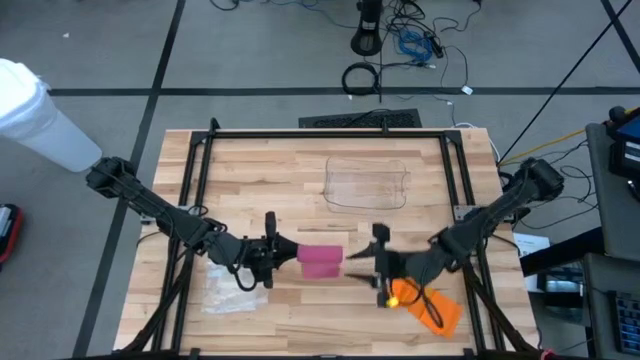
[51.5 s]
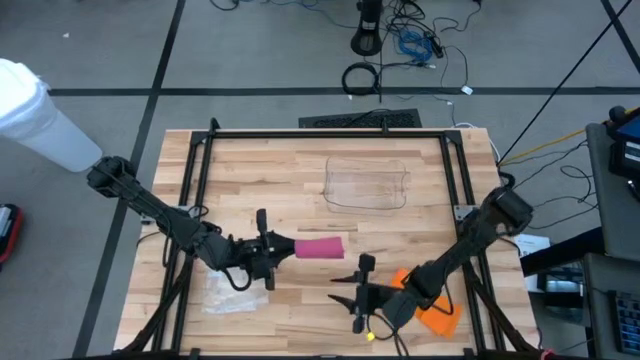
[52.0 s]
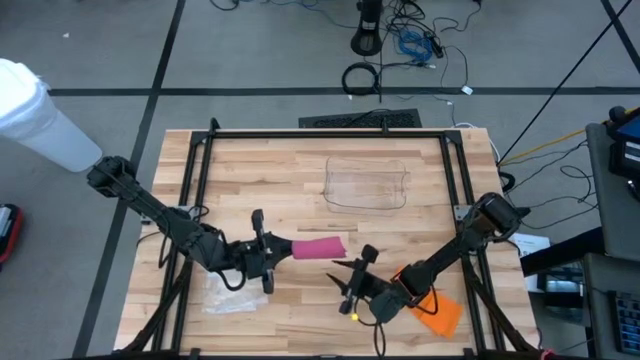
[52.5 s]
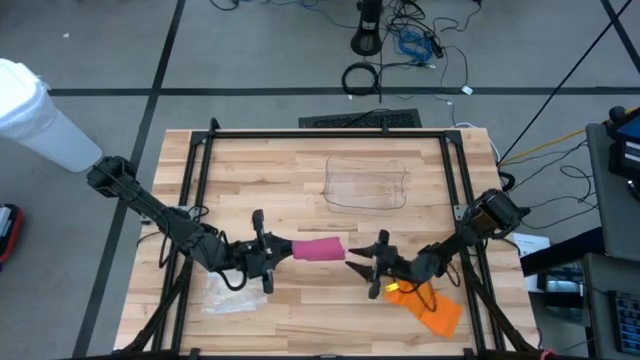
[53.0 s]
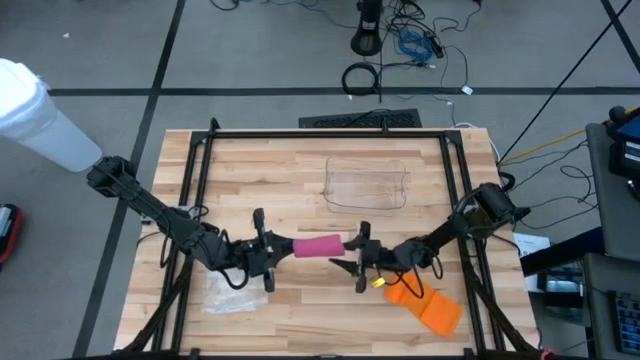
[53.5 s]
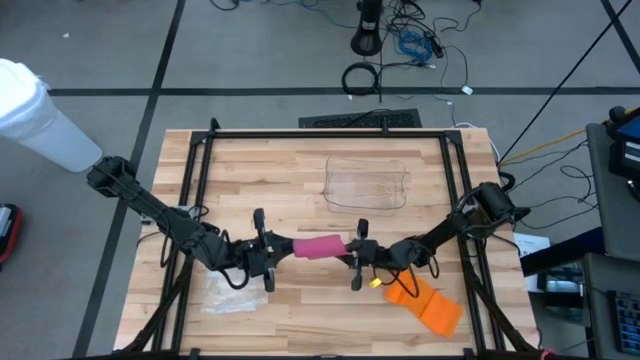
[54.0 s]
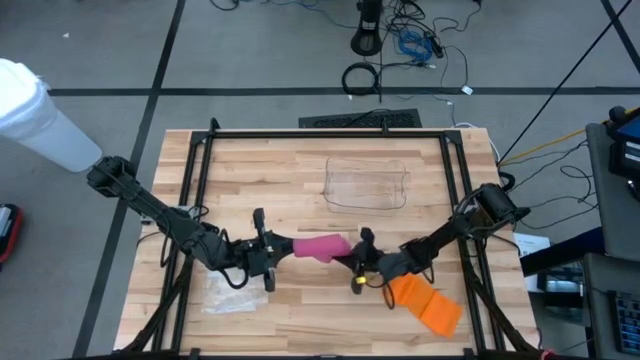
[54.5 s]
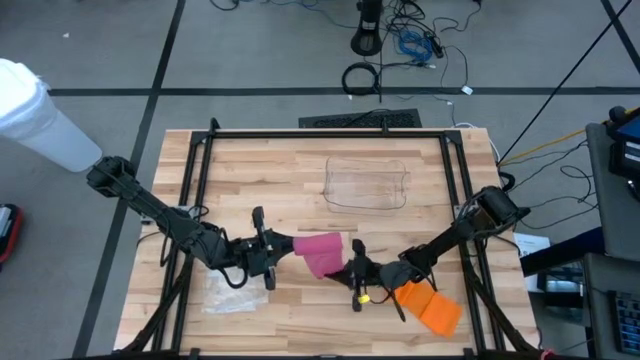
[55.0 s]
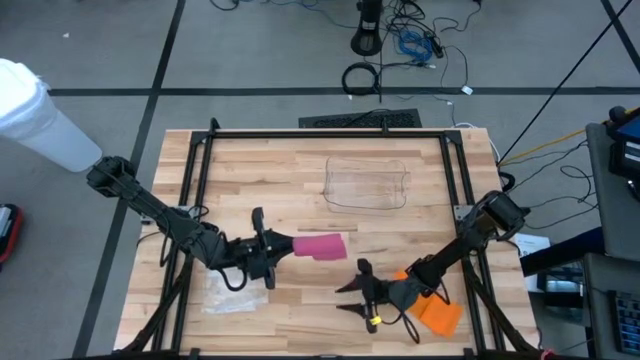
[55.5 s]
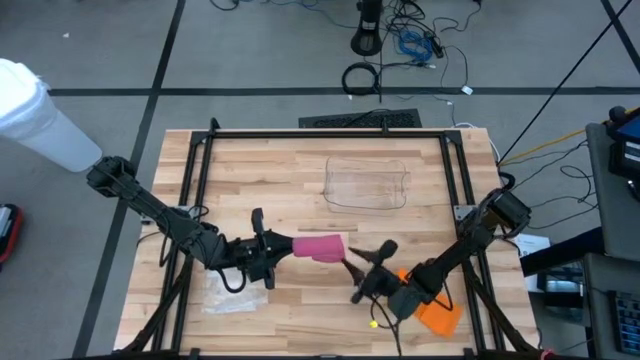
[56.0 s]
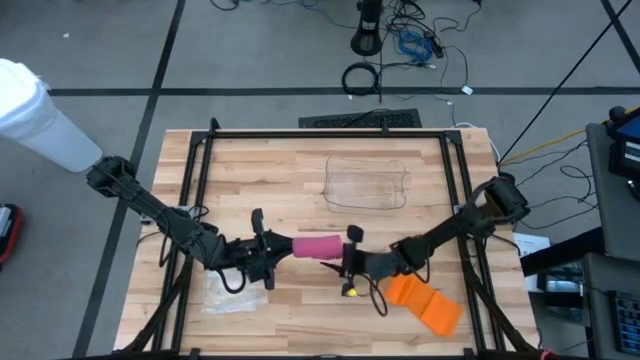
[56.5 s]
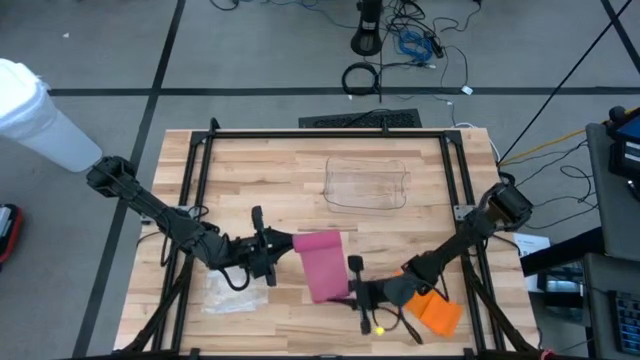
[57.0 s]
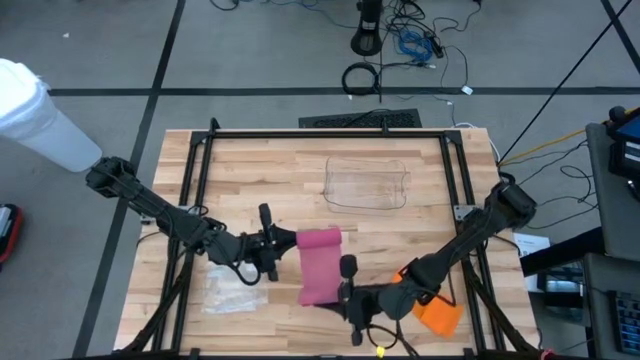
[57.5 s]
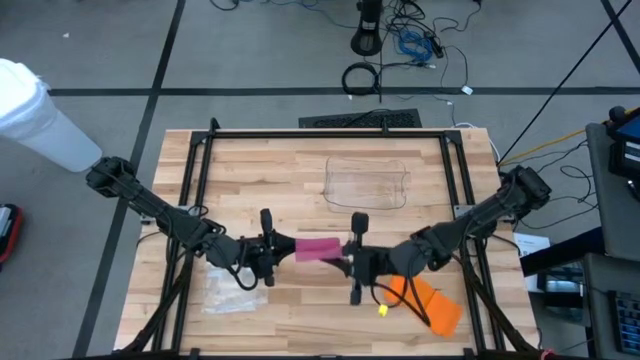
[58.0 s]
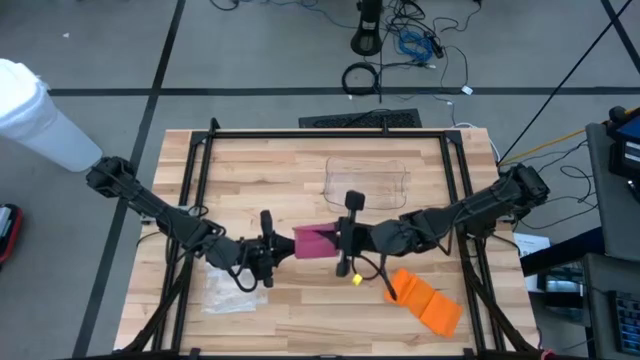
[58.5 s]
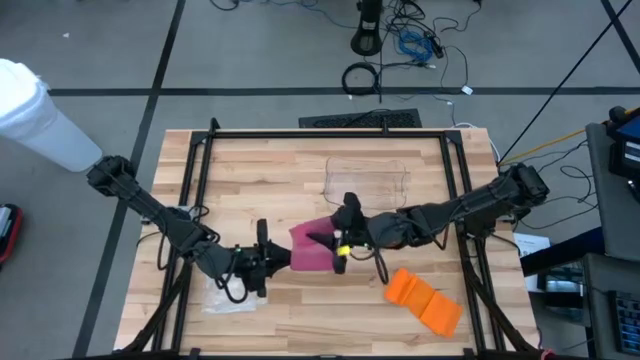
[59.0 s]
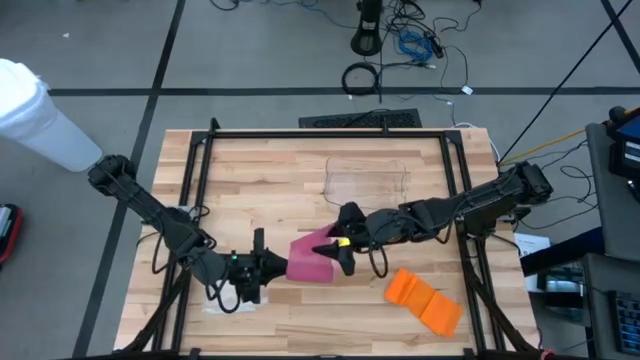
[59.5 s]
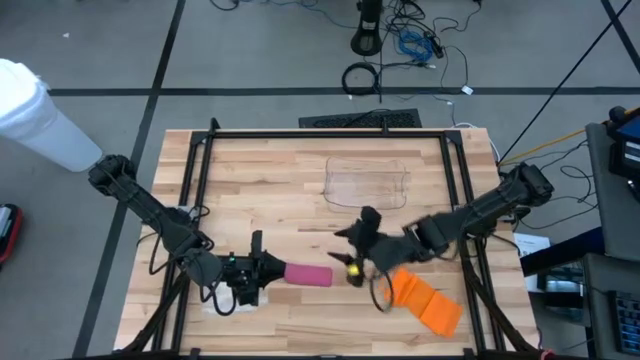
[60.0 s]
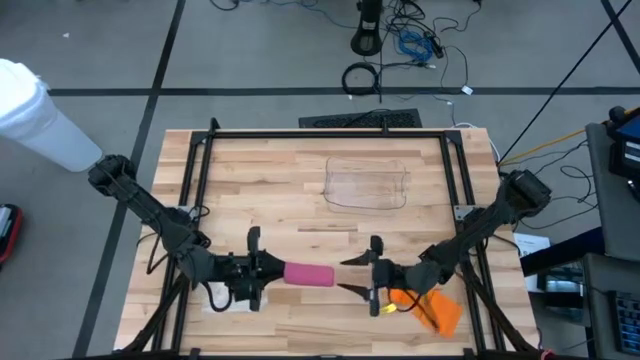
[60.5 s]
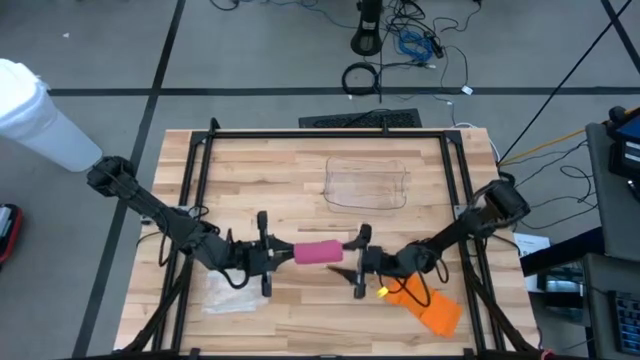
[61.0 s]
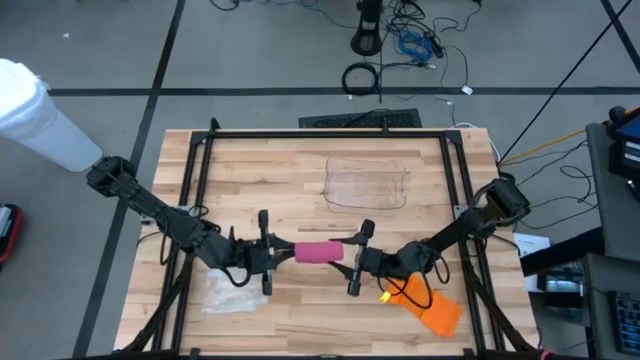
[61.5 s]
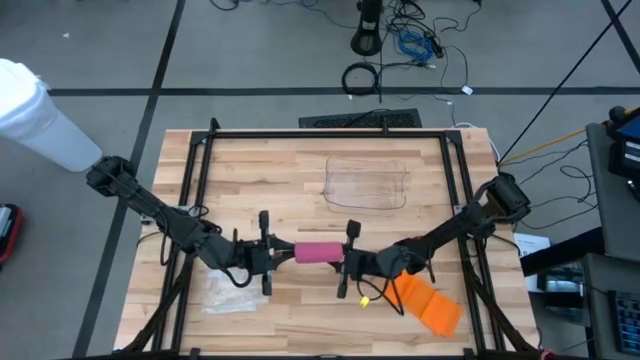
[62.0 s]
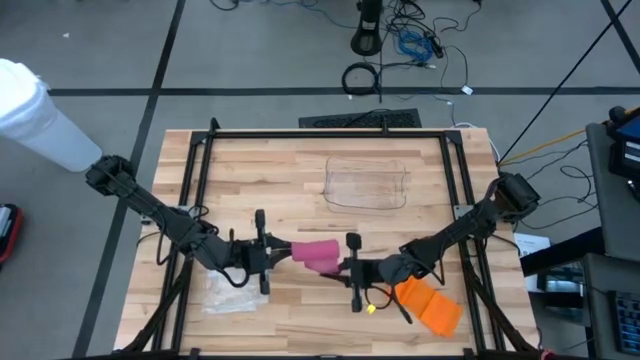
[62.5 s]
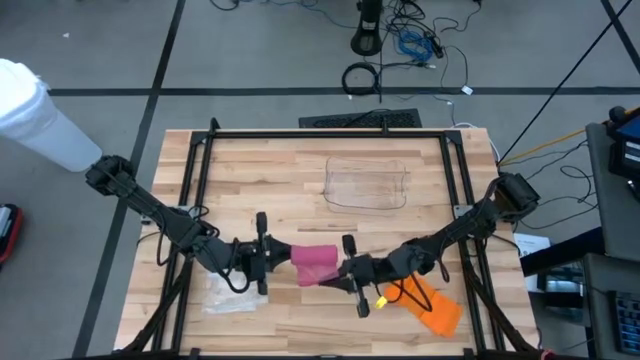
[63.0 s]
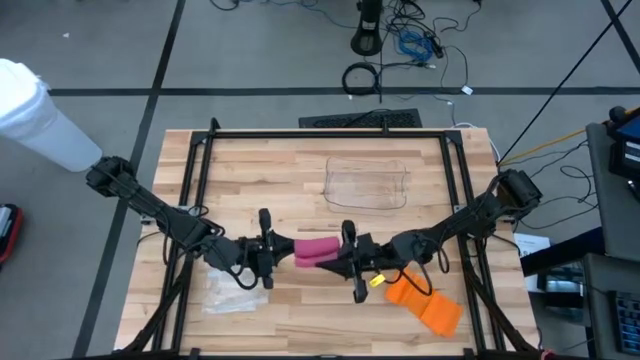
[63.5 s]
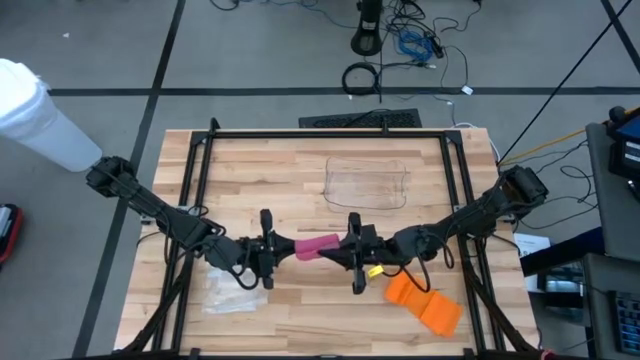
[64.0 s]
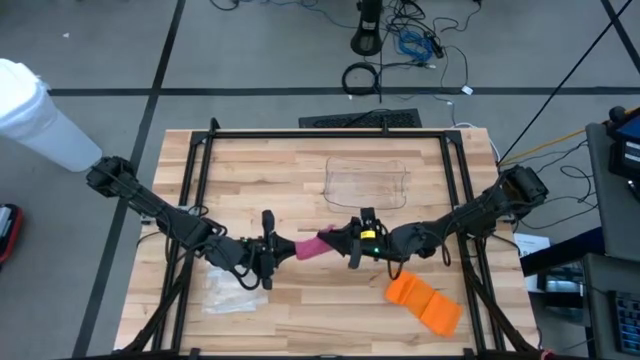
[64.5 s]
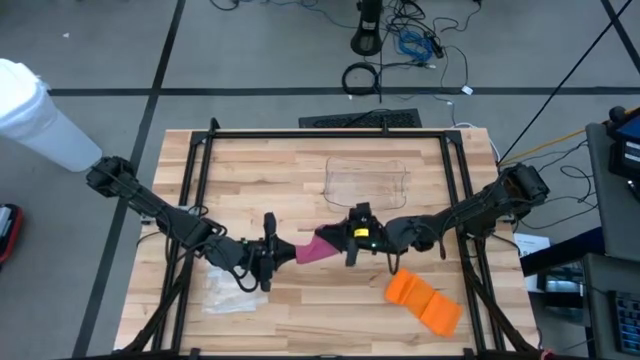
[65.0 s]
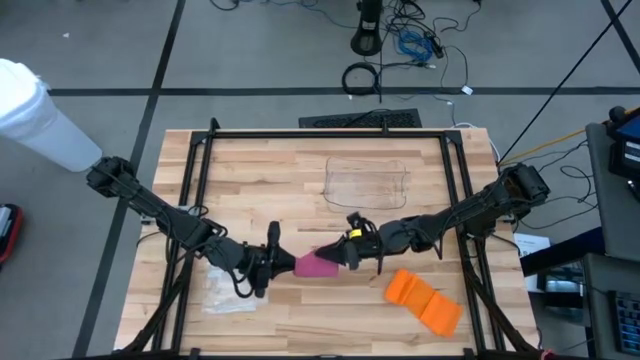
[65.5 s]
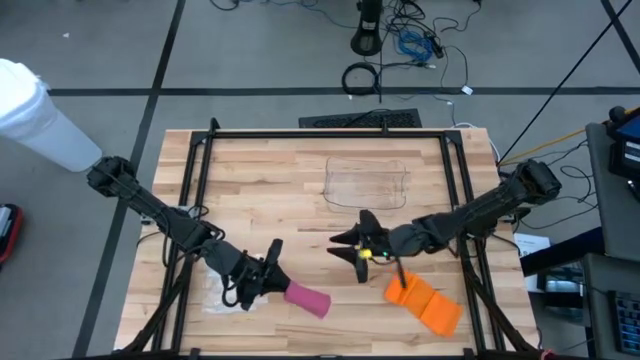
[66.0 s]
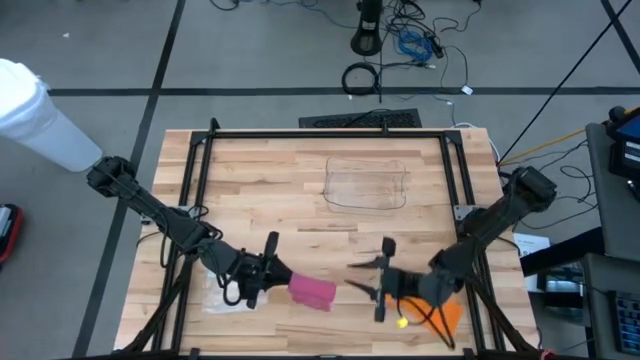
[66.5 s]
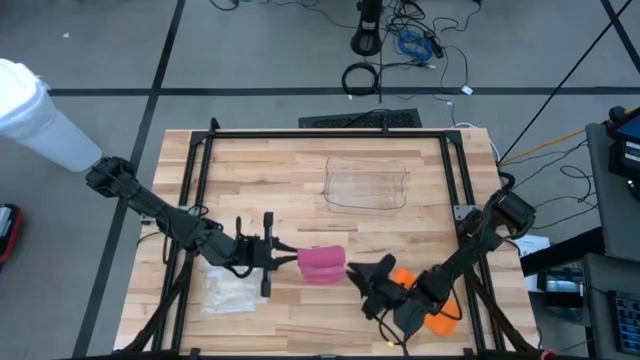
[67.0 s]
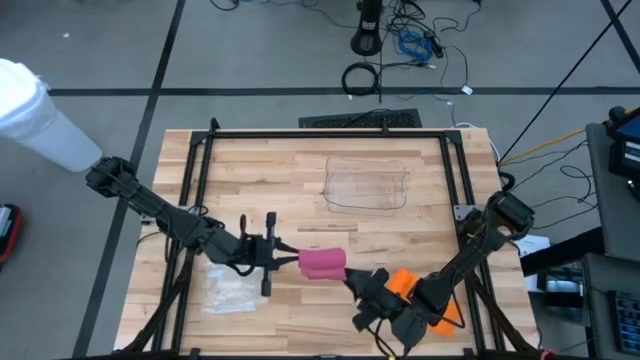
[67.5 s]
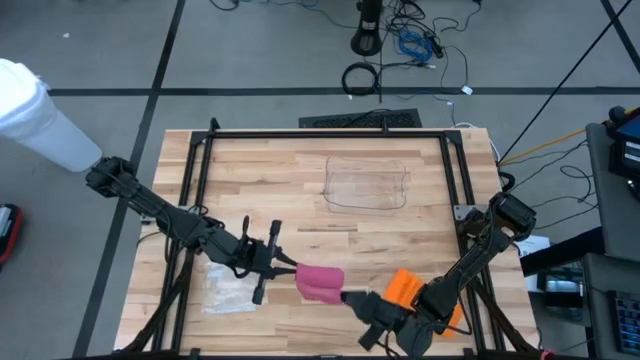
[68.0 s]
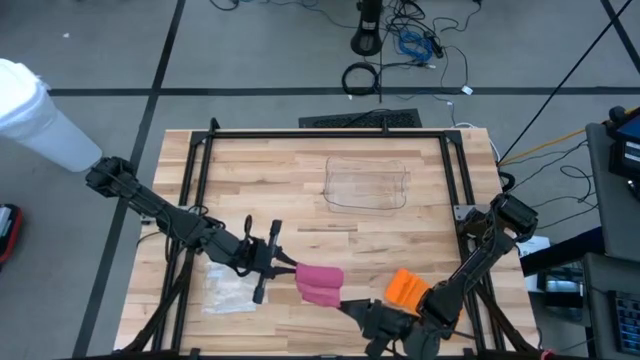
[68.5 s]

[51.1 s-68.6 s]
Task: Roll bandage
Roll the pink bandage

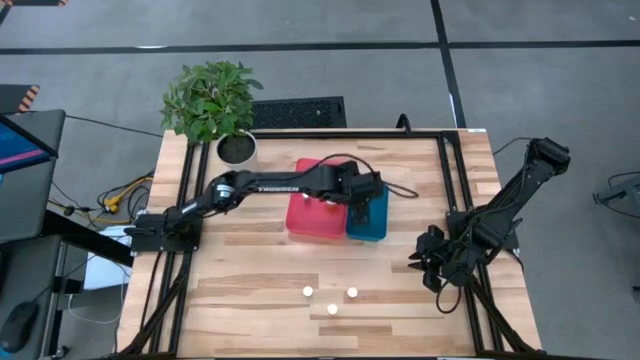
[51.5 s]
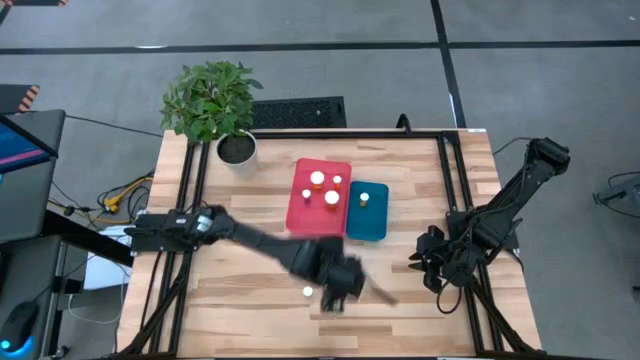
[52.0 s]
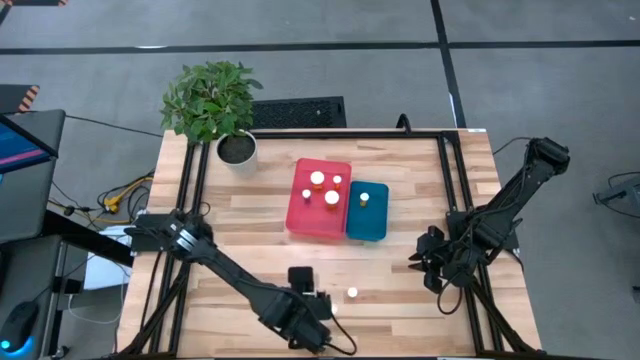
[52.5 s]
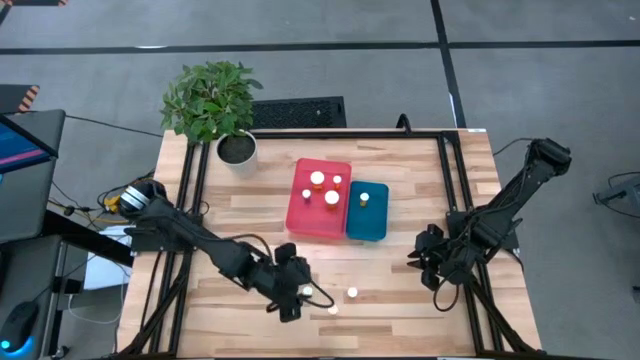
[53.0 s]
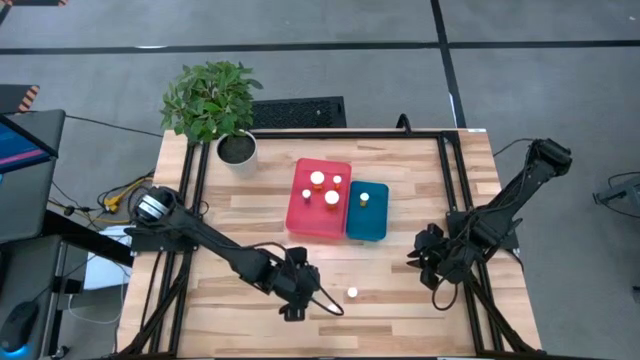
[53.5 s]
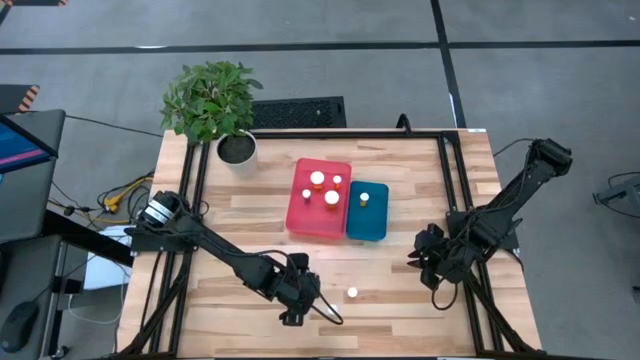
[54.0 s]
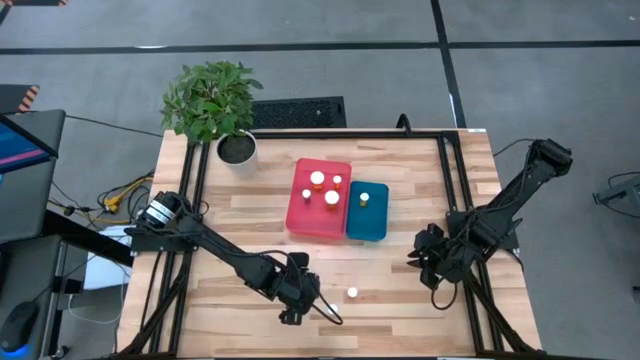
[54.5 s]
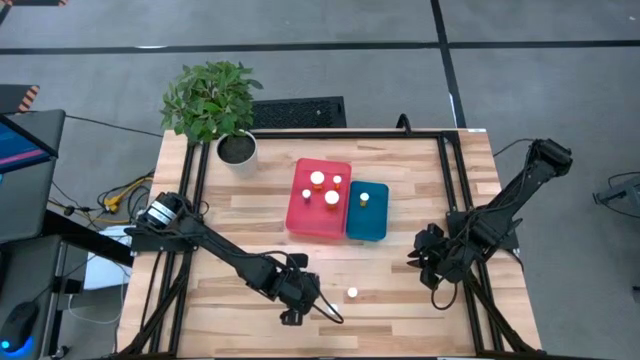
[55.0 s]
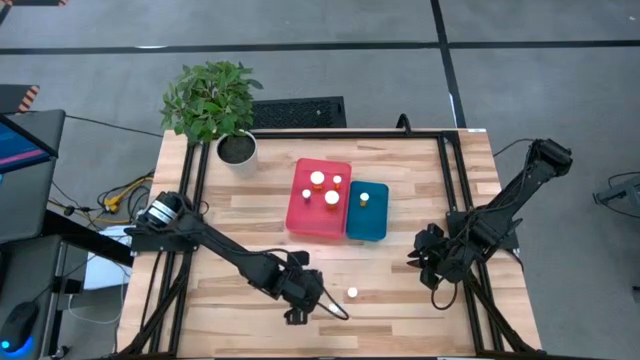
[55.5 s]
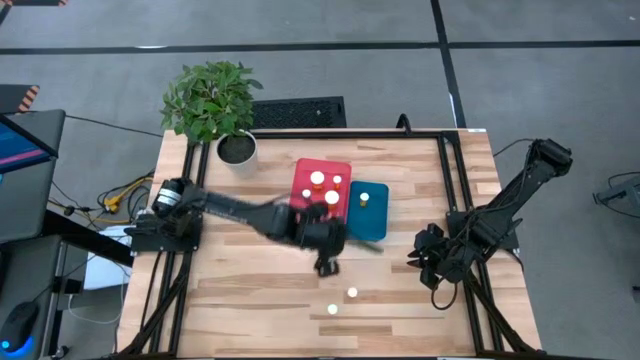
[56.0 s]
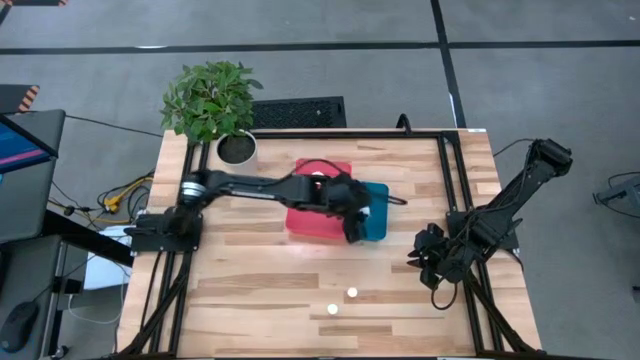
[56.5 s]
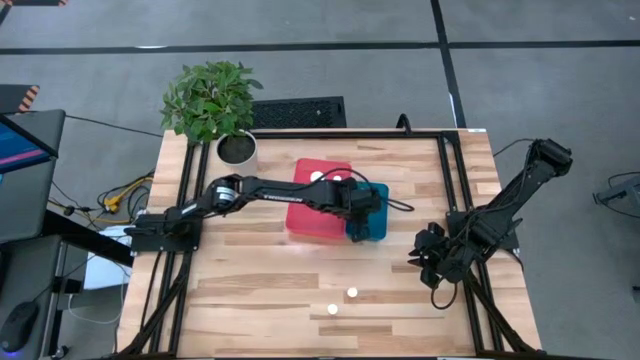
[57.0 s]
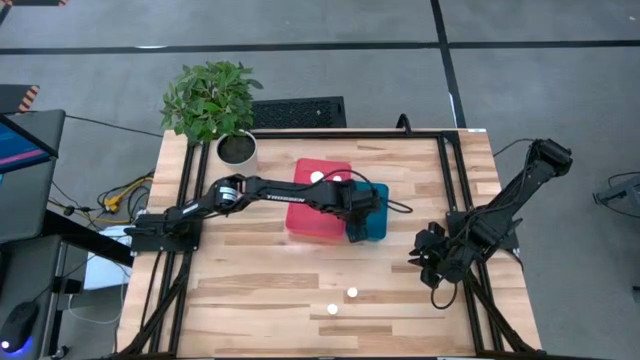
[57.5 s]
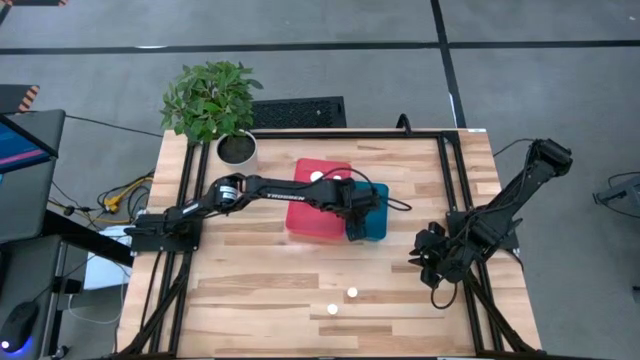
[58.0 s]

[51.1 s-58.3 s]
Task: Pick and place medicine bottles into bin by pill shape (circle, oval)
Put the green pill bottle into the blue bin
